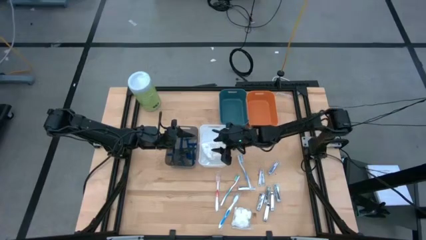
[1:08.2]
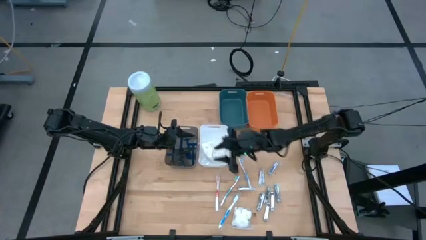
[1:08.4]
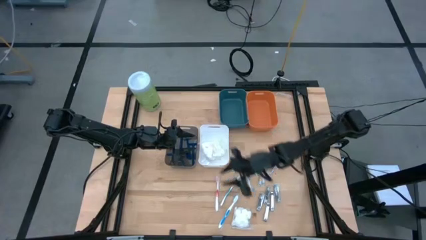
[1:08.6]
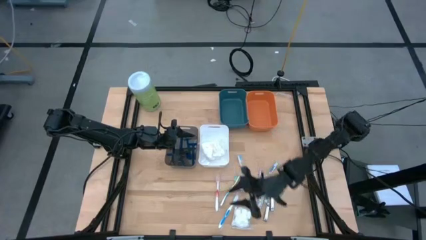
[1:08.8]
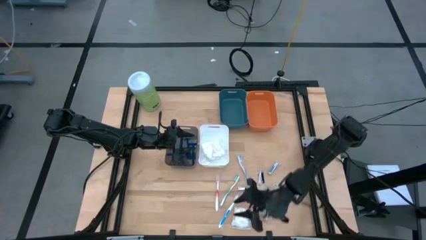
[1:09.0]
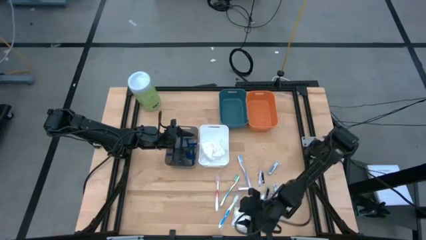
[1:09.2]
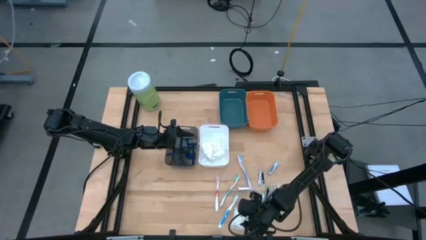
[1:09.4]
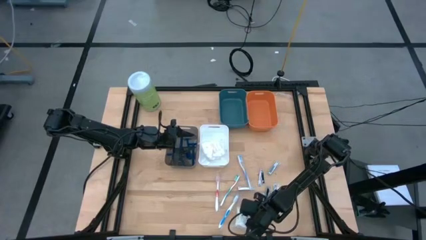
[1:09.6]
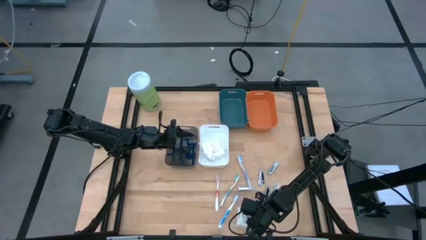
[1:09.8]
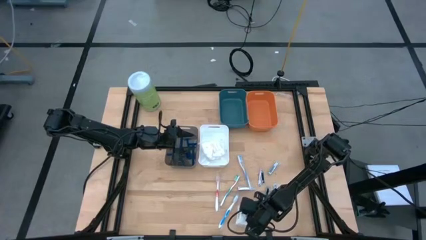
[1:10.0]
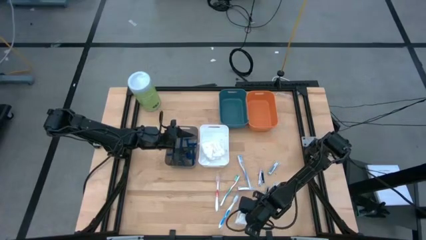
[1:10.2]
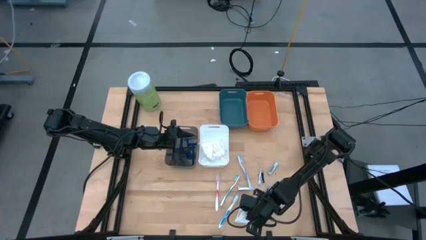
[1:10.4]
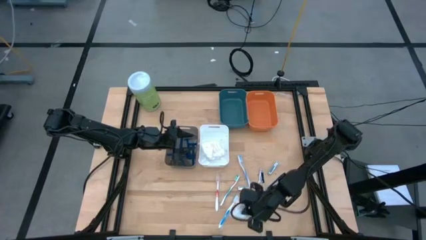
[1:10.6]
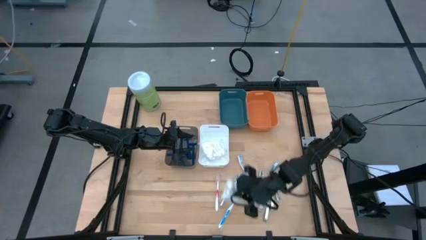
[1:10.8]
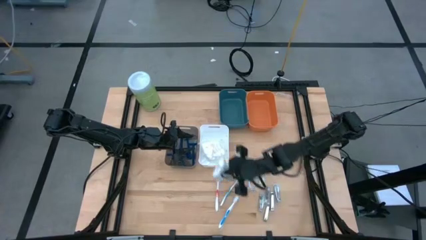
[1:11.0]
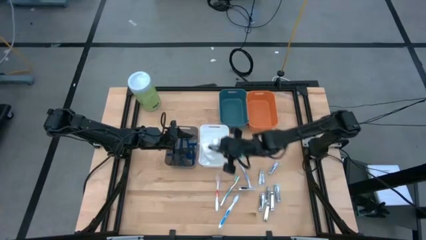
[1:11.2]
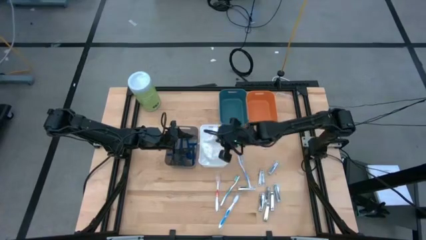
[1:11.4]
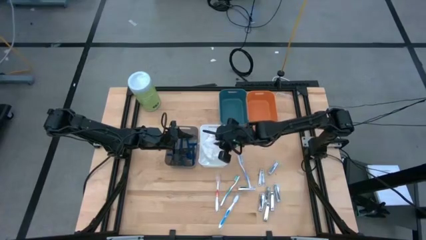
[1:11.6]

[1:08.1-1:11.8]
Task: Pick & Place Travel size toiletries
Put the cotton pack into the white bin

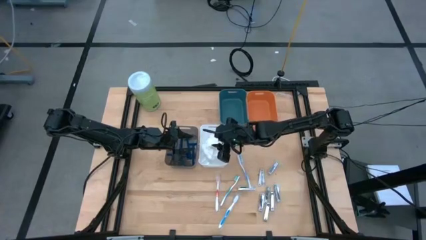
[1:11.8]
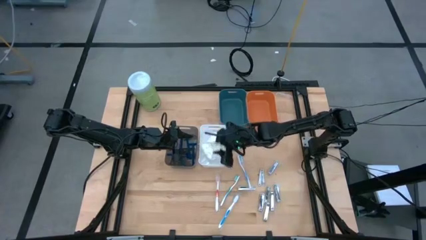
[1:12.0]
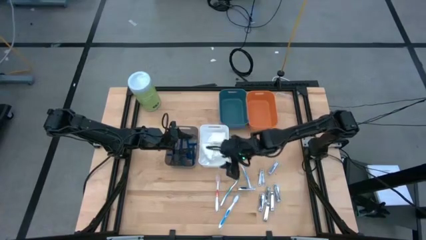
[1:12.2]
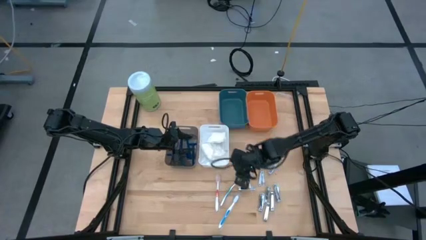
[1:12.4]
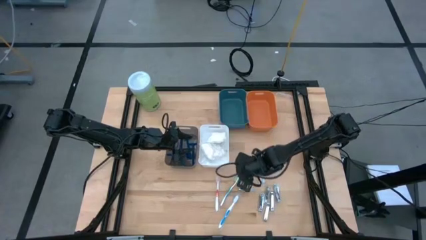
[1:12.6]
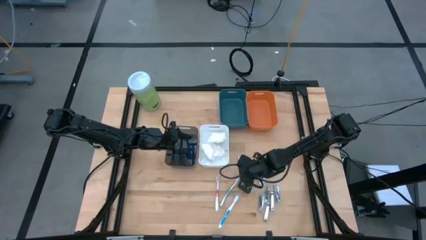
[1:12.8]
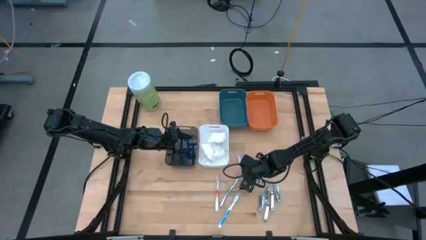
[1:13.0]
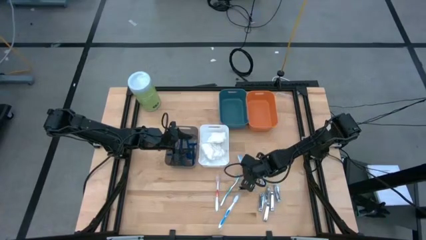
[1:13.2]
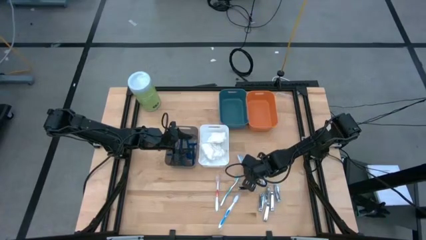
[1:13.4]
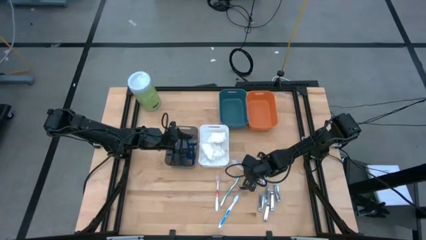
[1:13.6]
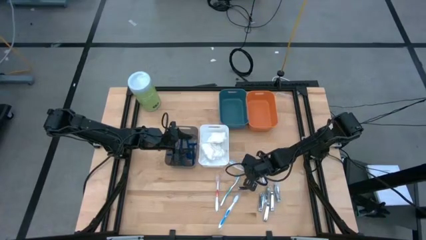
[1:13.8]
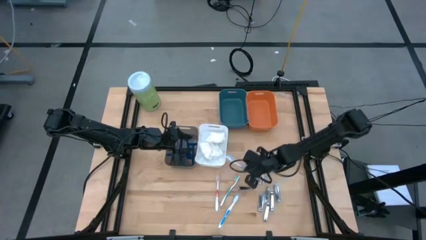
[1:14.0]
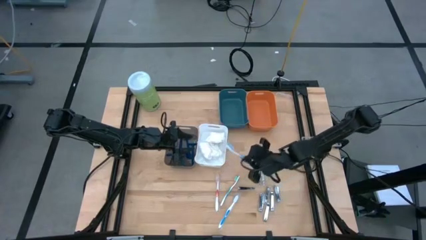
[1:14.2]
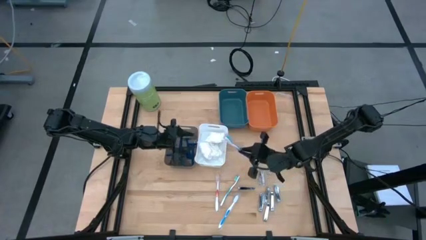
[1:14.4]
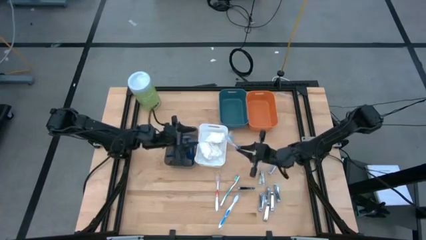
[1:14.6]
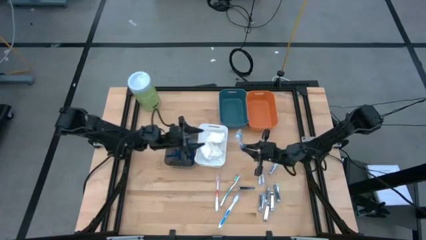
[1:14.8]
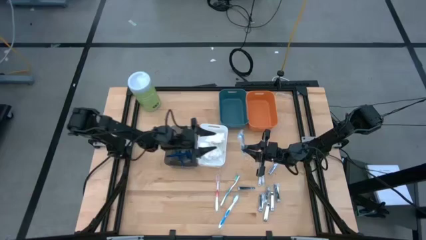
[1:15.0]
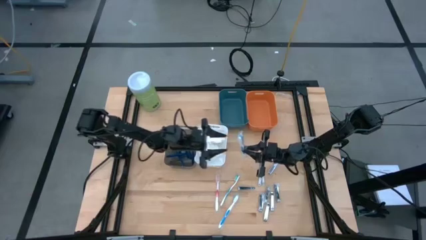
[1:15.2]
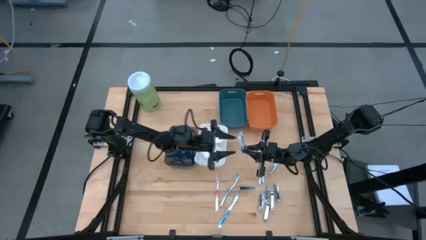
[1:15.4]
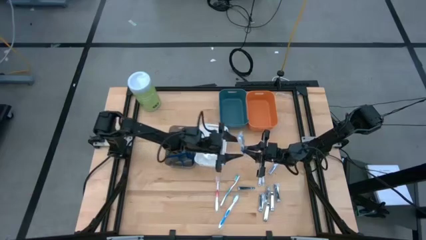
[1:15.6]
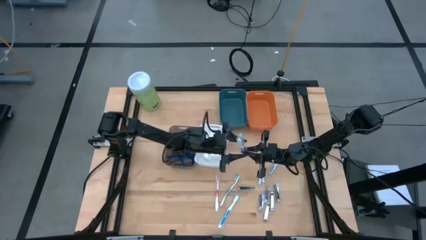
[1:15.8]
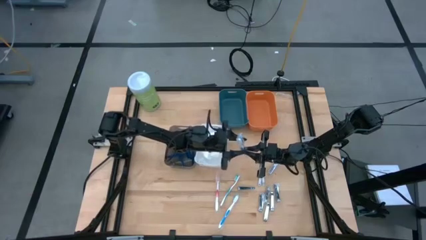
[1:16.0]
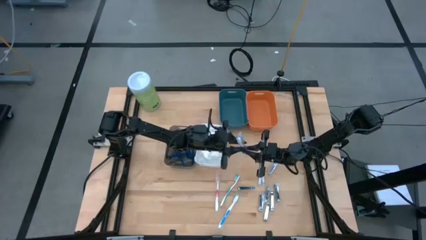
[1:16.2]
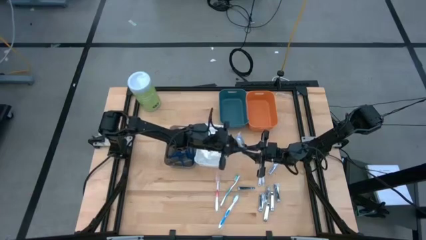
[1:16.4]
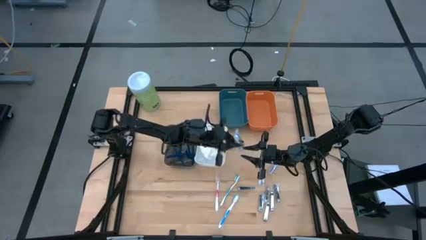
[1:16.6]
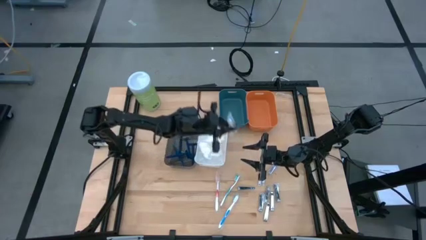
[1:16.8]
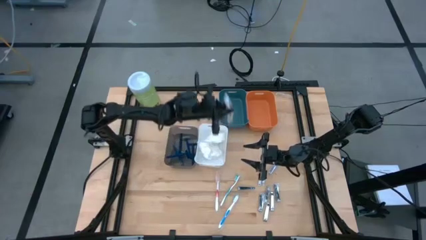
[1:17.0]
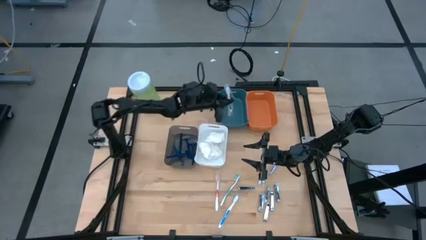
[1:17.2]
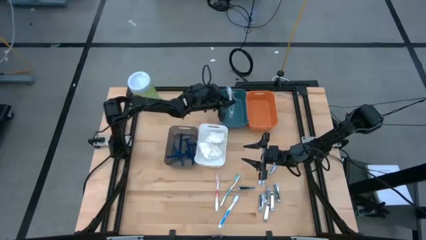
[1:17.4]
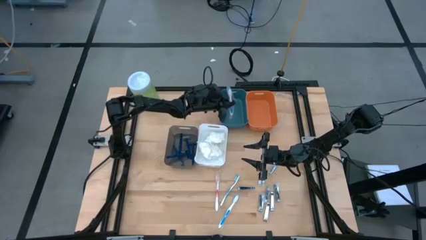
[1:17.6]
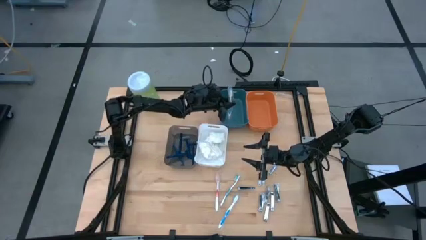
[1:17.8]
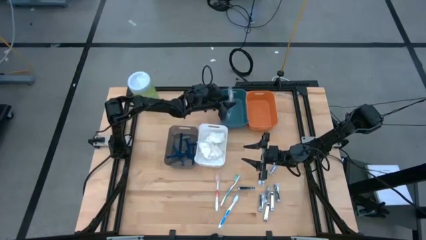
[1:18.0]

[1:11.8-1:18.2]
Put the blue toothbrush into the green bin

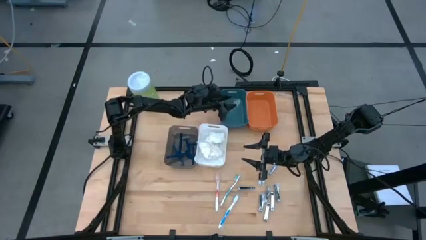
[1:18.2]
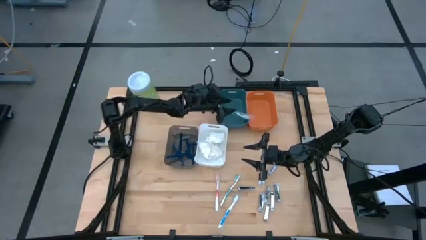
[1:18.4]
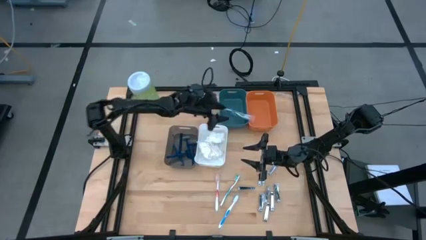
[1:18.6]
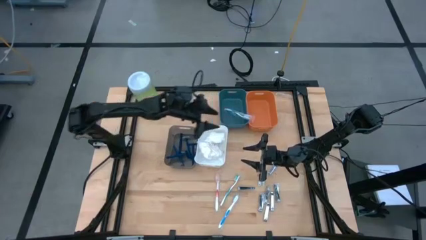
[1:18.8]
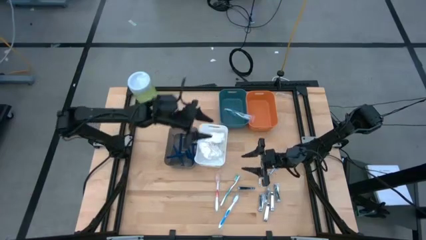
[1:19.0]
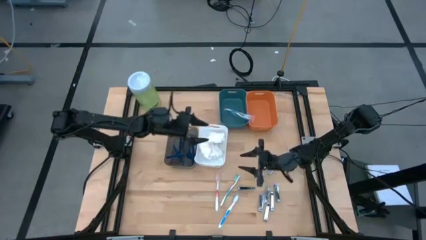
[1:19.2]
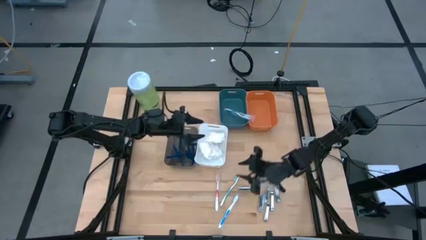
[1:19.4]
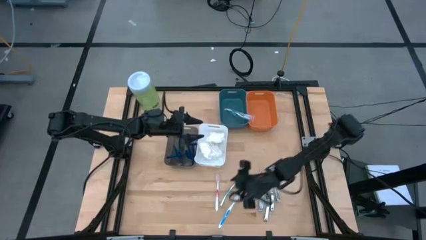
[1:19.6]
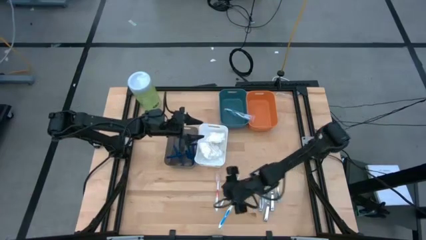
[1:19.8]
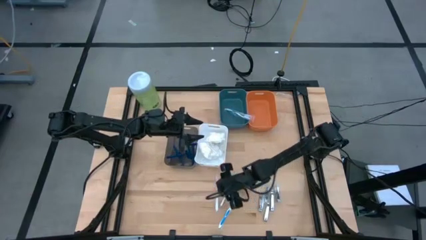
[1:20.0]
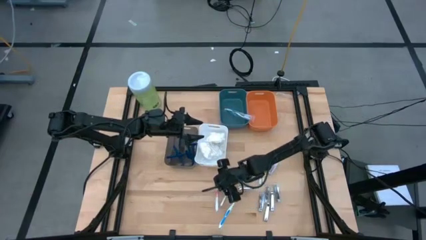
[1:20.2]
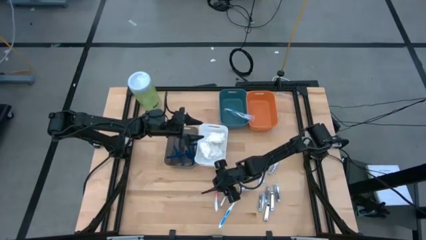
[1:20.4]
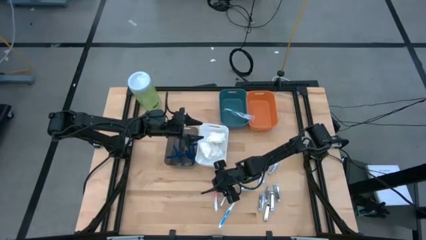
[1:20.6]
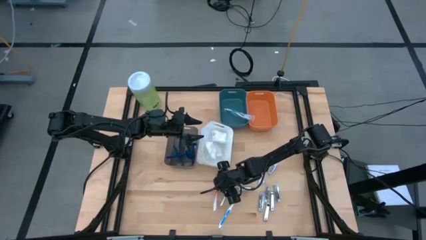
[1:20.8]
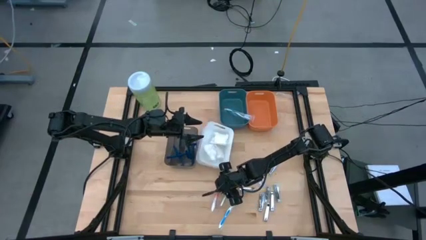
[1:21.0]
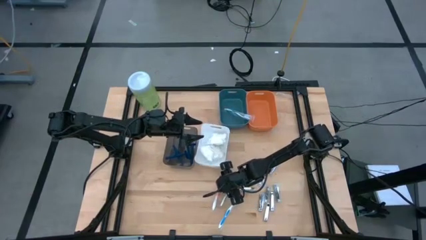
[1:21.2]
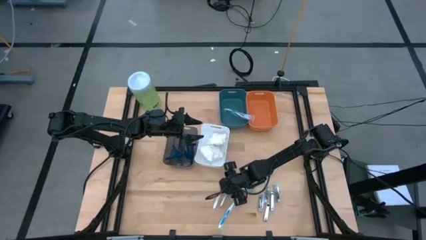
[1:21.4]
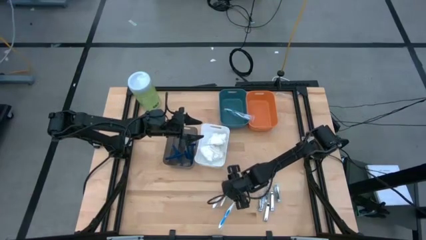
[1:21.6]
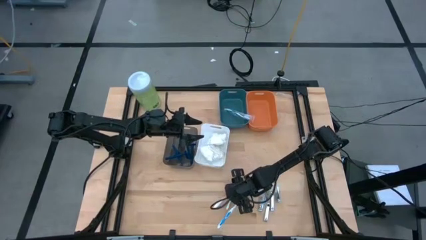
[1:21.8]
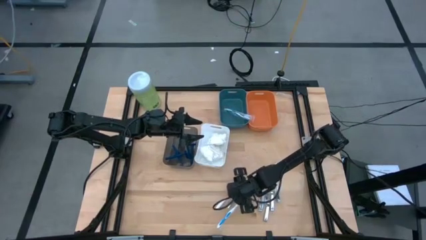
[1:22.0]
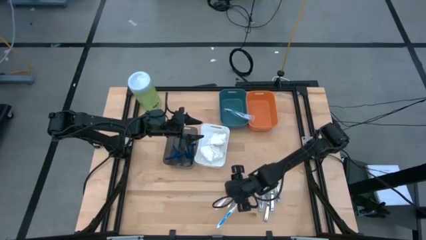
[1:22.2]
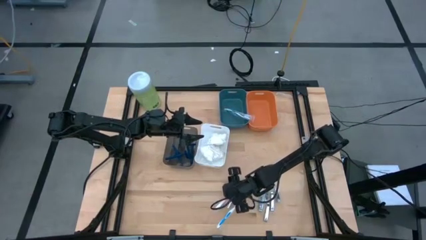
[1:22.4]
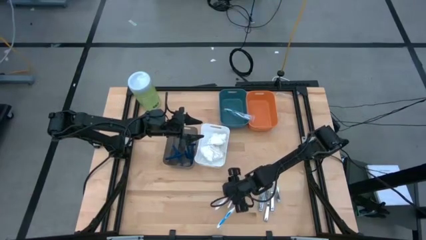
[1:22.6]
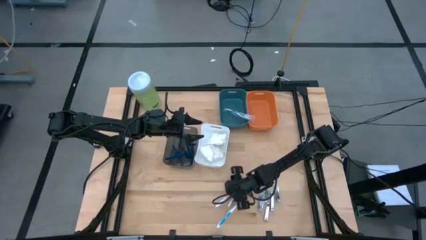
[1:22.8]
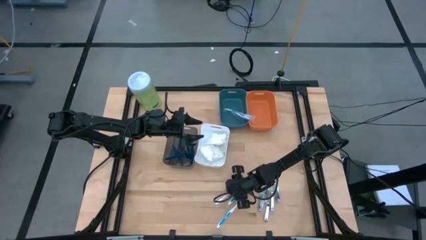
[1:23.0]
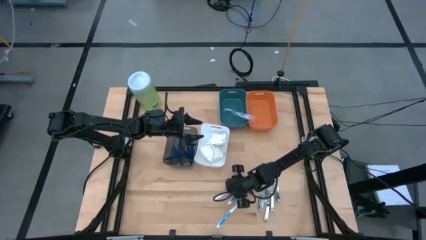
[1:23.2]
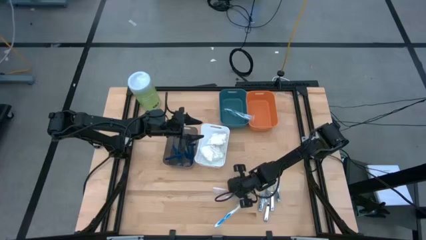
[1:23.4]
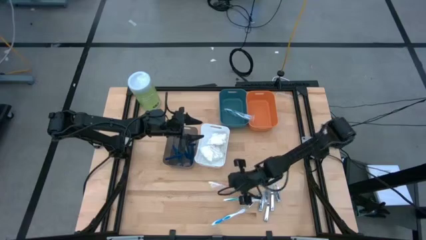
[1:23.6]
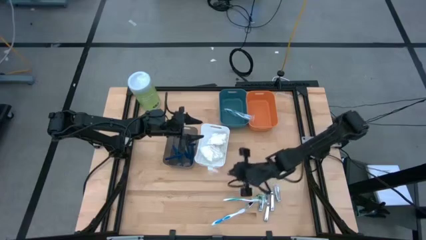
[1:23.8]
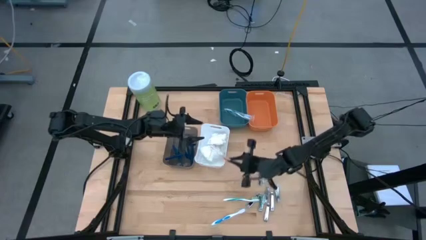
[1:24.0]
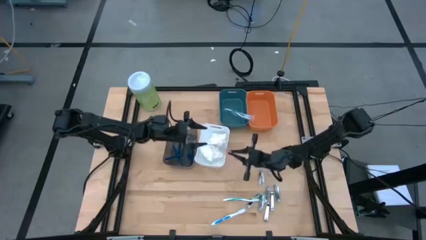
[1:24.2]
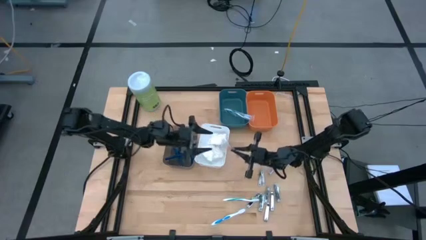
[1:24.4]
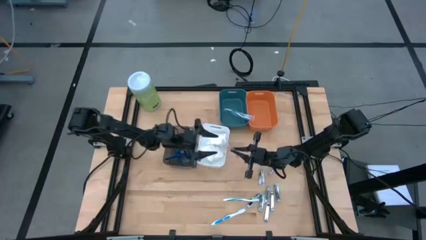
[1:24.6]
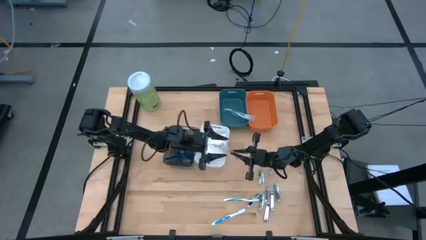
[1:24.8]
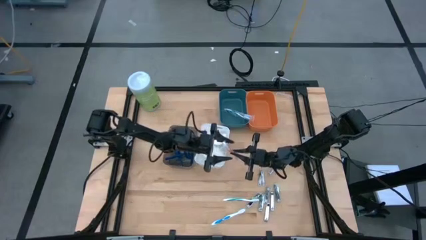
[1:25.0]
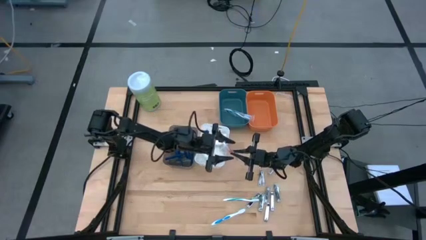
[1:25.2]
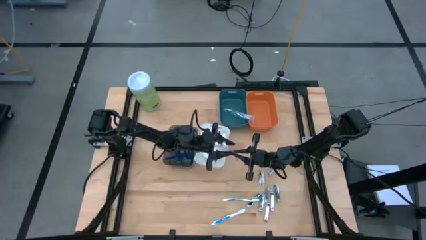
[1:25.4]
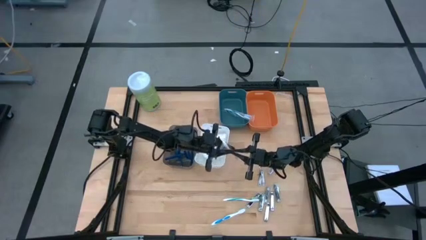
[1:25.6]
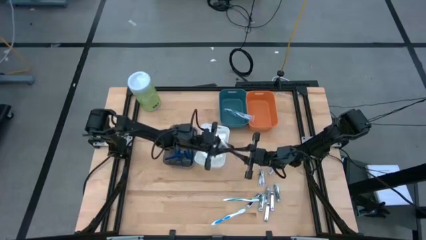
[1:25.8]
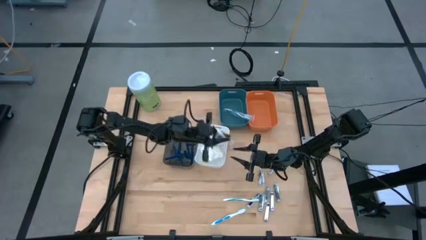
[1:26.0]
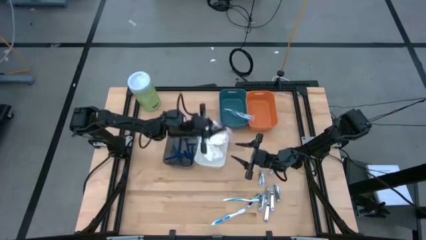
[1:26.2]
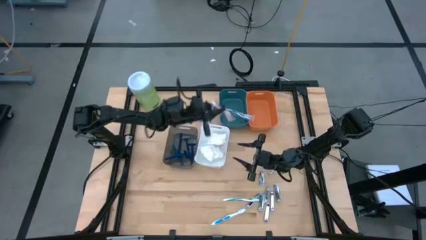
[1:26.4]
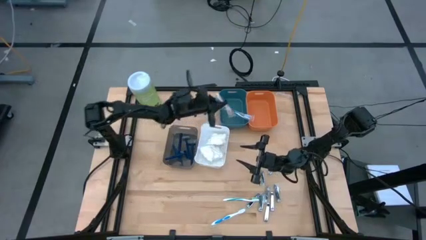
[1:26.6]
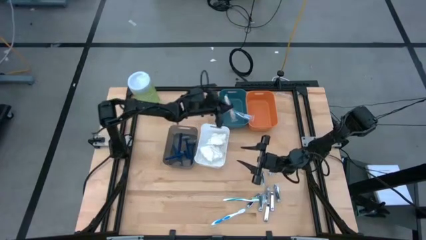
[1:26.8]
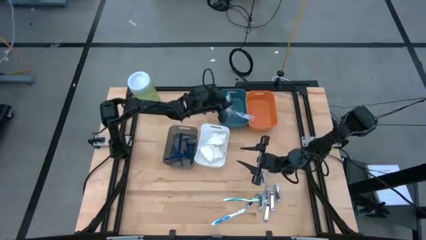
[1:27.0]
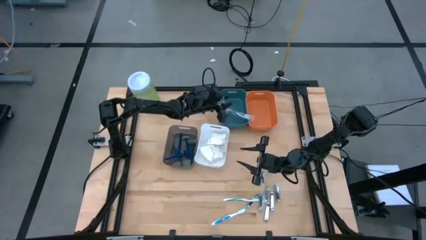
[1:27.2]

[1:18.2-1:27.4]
Put the orange toothbrush into the green bin
